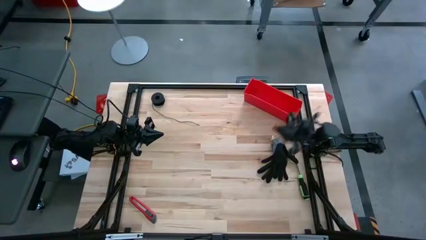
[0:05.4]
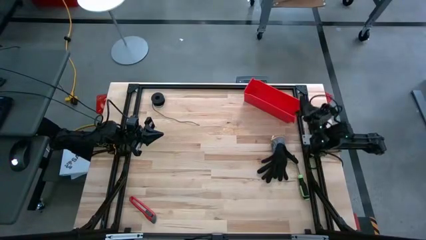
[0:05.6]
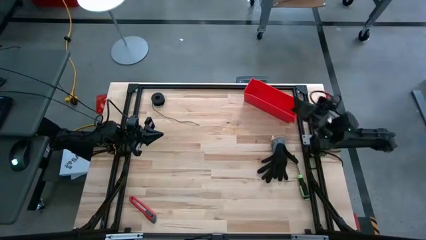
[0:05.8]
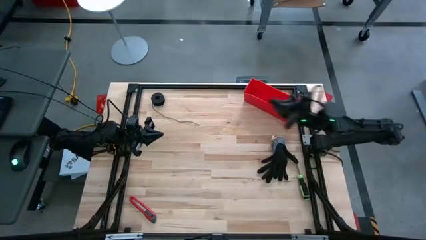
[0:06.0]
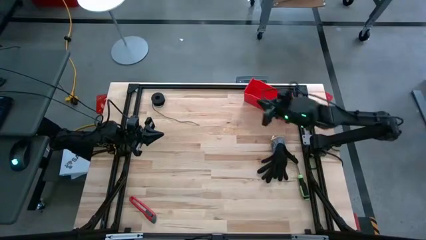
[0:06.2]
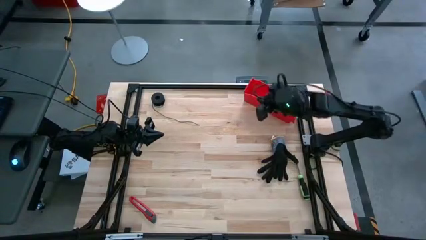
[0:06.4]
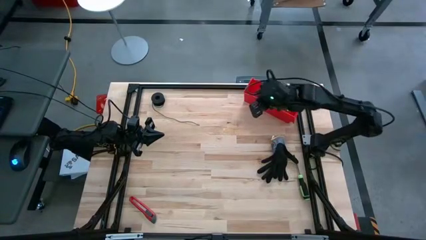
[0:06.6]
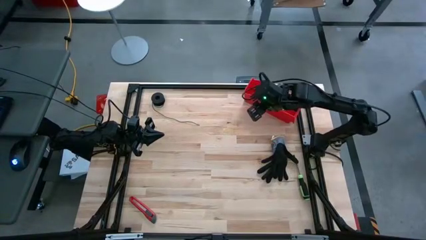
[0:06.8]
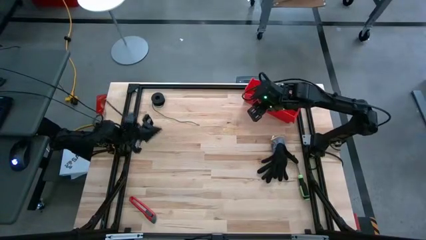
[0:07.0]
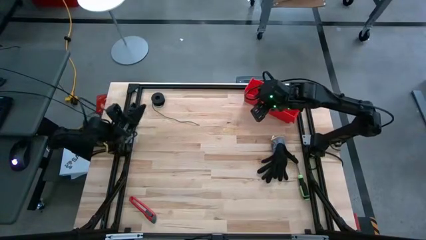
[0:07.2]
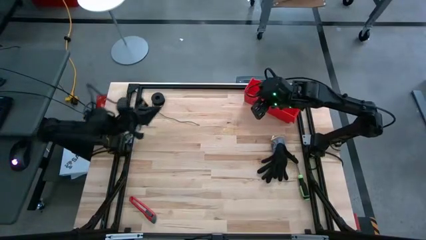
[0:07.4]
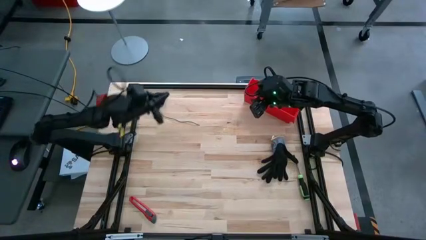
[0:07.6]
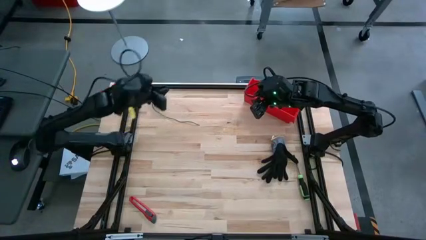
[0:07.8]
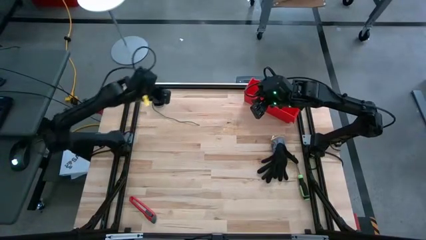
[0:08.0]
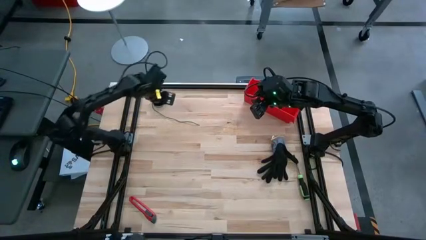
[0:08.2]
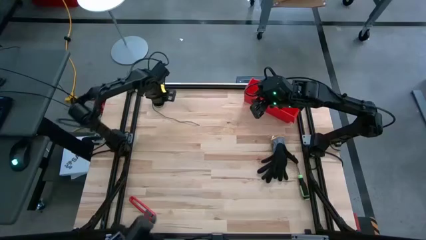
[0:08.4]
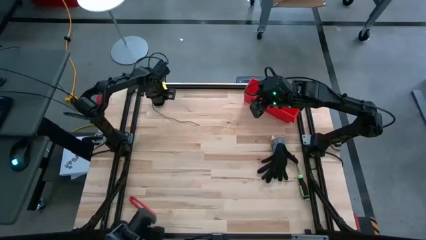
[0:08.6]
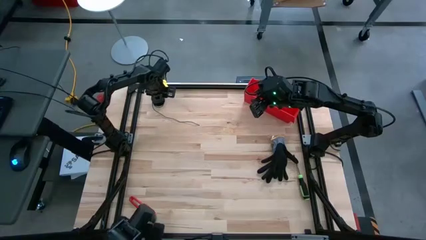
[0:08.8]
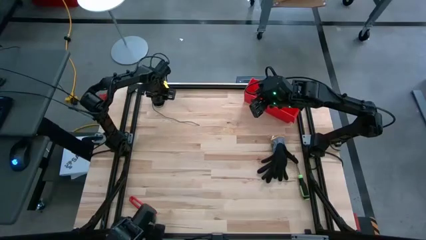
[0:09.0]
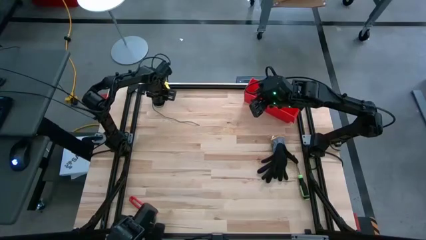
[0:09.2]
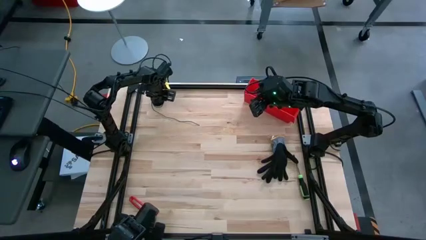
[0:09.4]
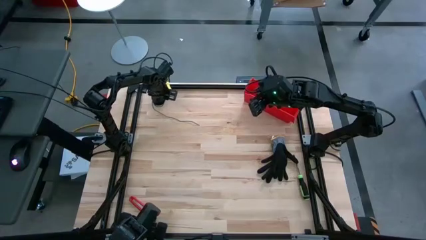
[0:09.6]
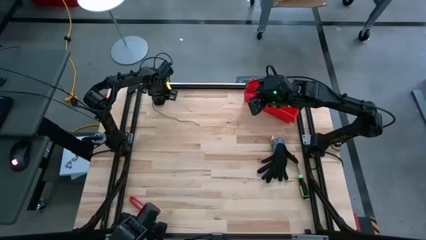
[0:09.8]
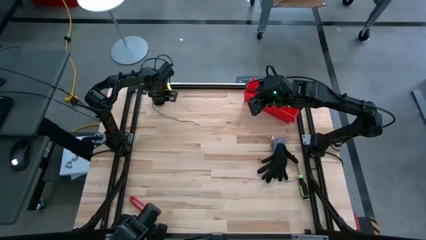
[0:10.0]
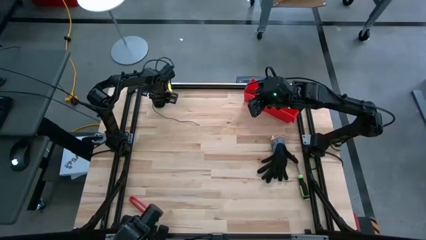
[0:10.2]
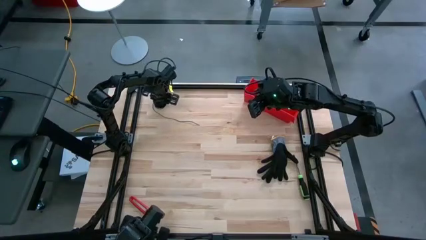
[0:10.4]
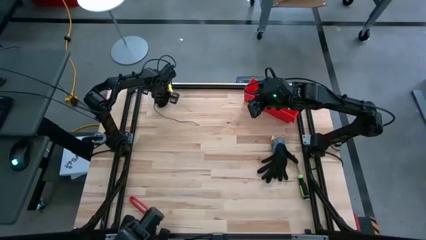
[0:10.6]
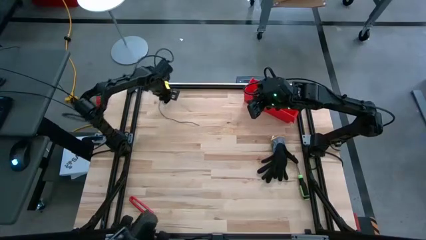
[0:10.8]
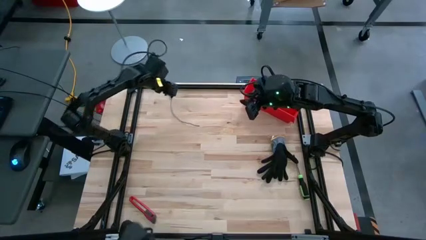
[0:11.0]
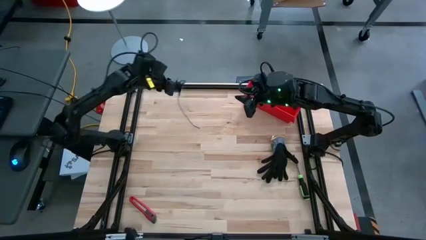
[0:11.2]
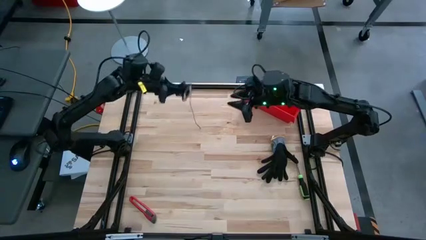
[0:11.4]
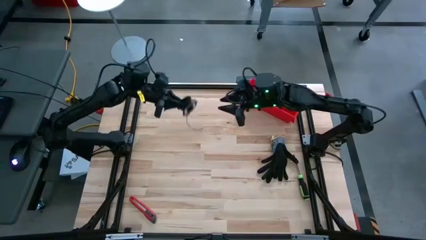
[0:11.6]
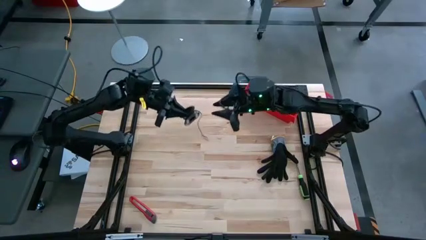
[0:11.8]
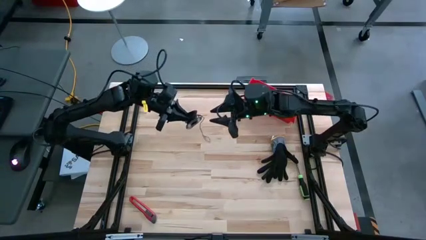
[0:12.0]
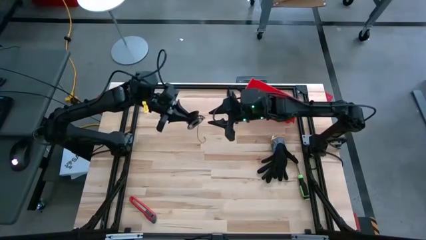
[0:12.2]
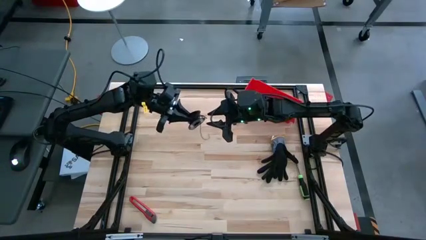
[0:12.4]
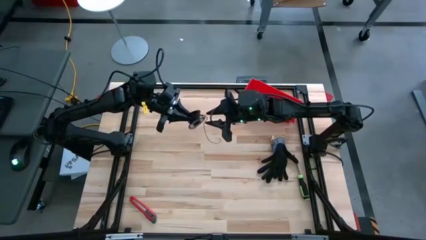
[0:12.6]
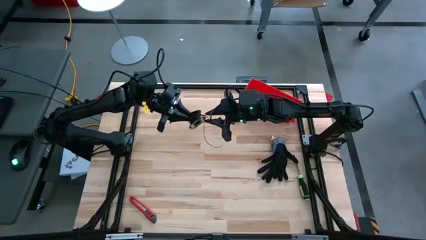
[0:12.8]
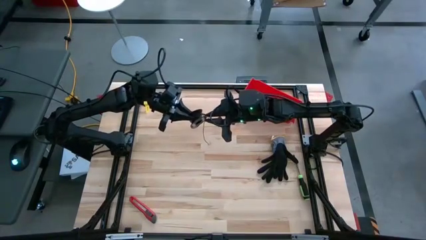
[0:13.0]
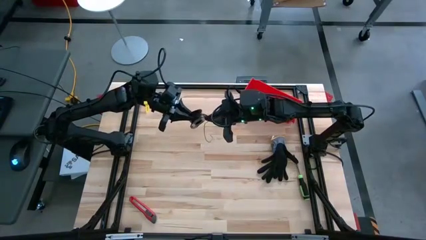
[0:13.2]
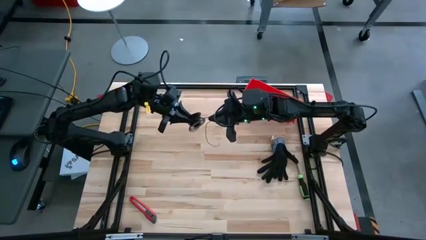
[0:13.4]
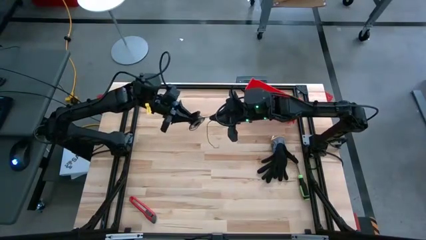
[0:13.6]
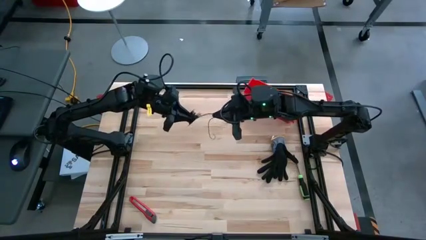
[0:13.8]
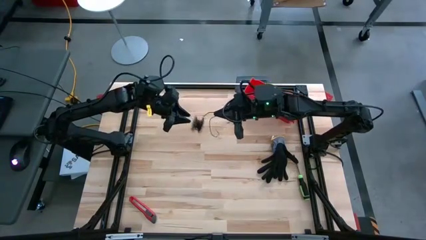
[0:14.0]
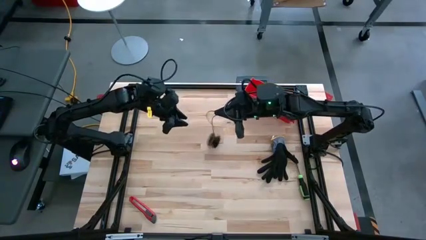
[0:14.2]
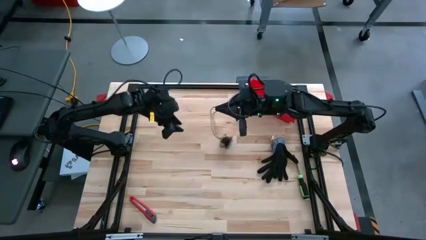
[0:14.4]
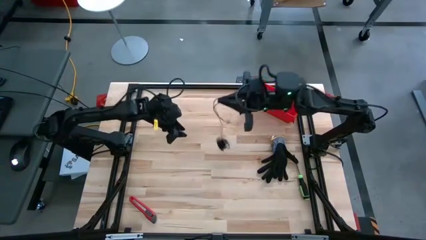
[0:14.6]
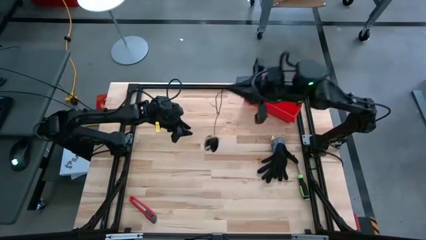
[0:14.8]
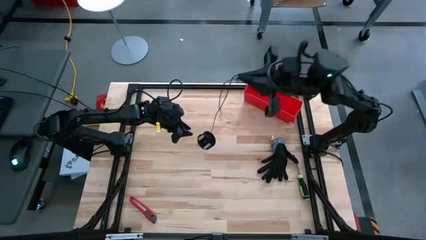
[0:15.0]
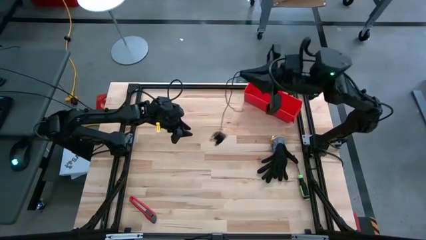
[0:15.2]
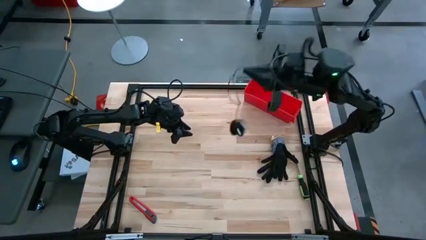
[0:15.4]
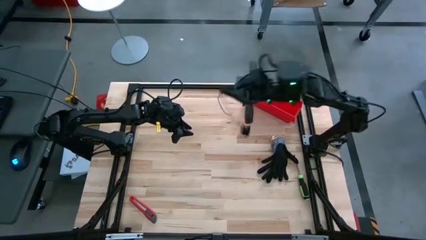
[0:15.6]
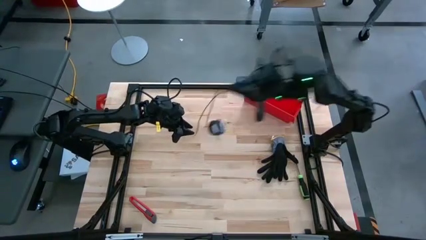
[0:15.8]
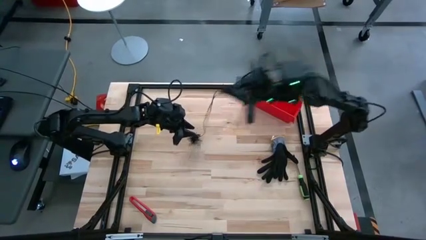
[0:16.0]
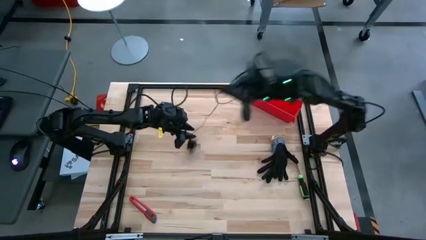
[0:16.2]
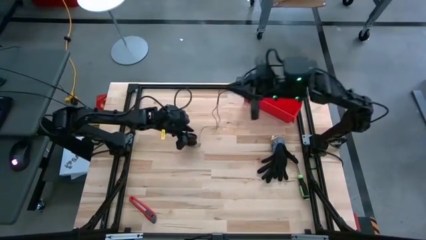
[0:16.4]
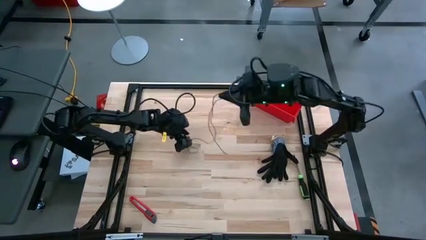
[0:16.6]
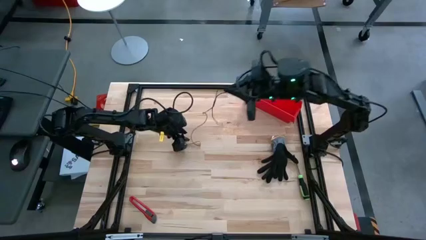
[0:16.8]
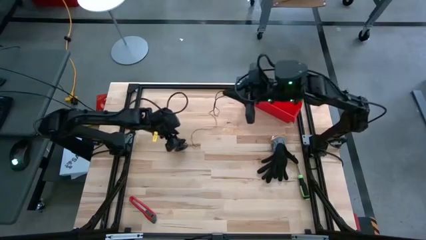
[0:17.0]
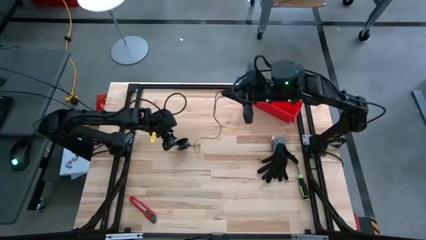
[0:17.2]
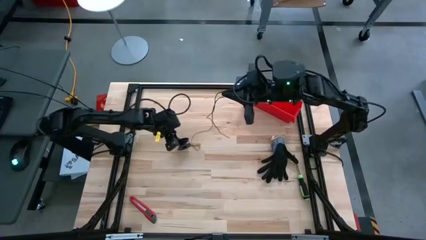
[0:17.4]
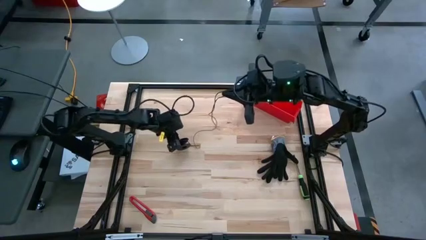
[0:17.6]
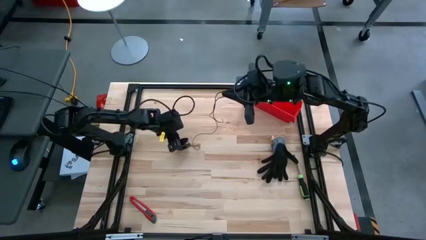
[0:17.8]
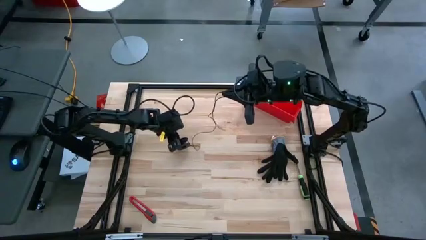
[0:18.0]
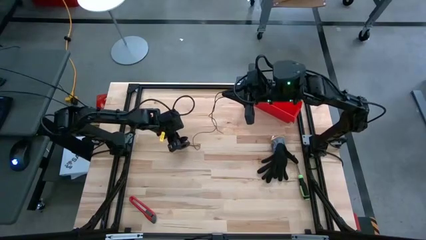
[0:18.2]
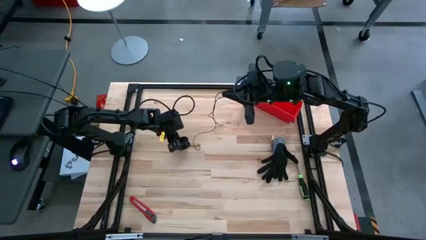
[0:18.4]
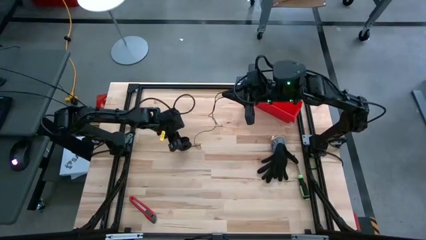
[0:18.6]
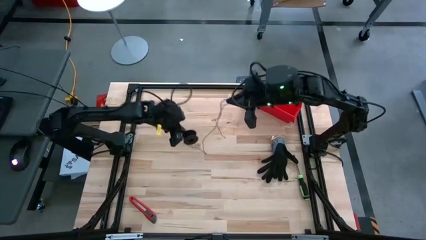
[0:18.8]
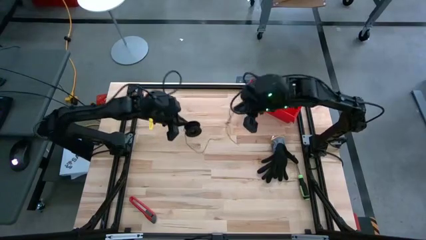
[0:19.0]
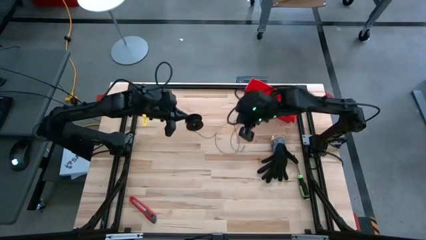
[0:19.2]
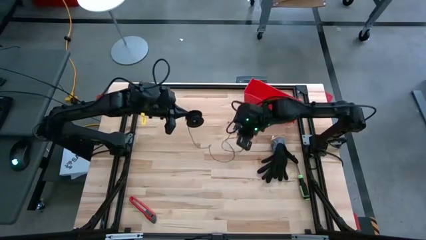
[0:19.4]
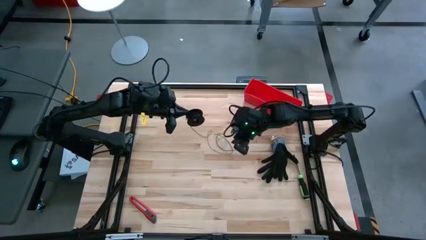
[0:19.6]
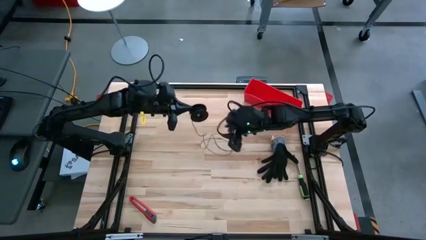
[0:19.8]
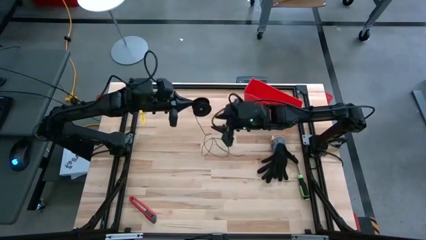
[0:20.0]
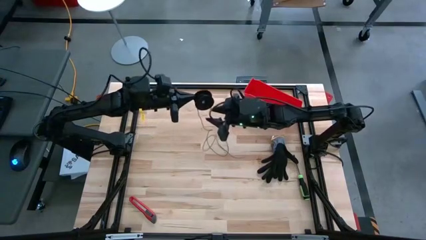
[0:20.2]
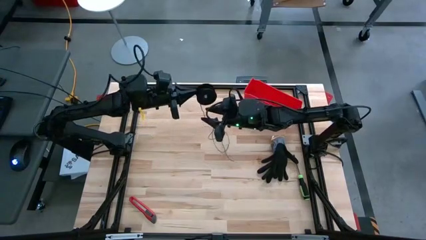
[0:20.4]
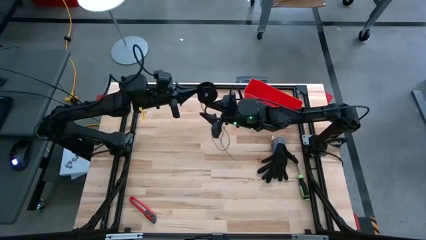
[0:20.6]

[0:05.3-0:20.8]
Task: Coil cords
Uncoil the black wire from the spool
